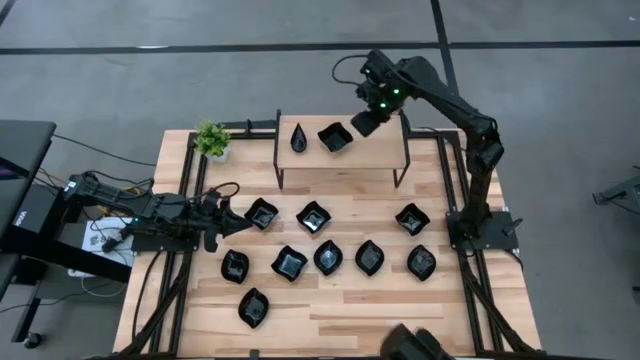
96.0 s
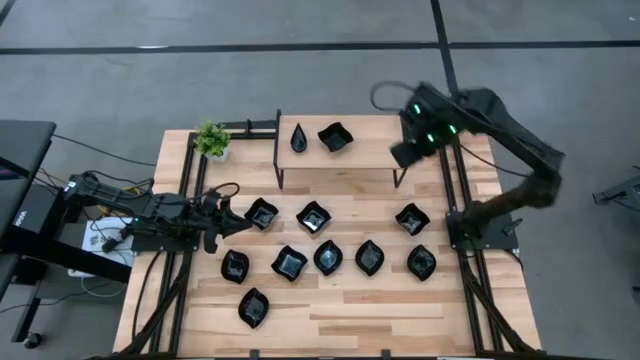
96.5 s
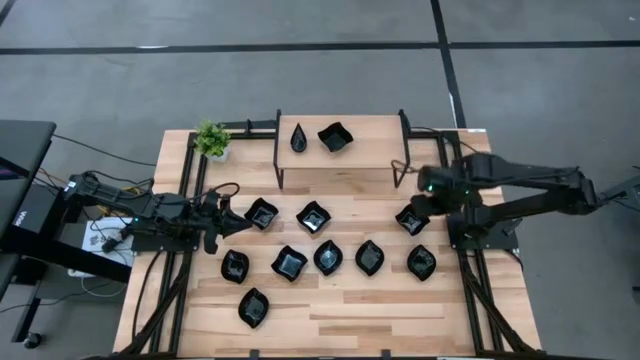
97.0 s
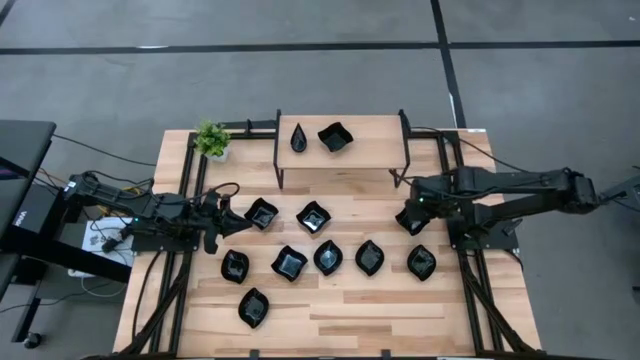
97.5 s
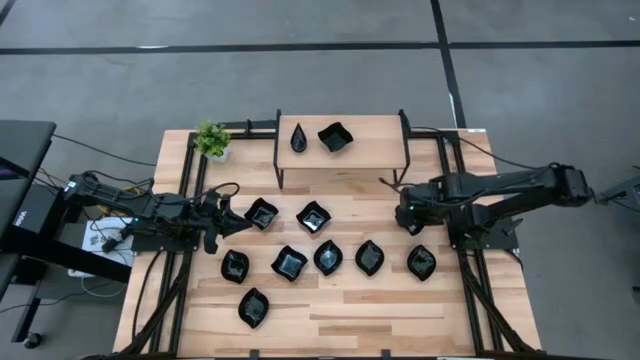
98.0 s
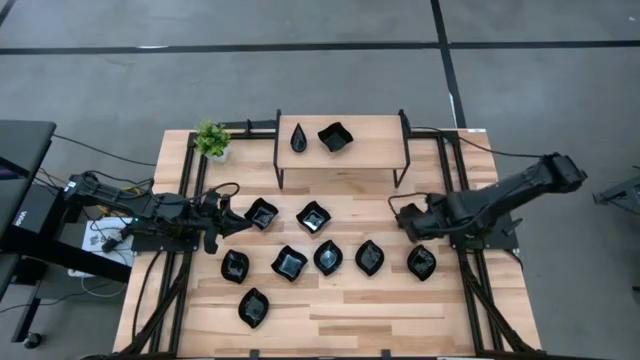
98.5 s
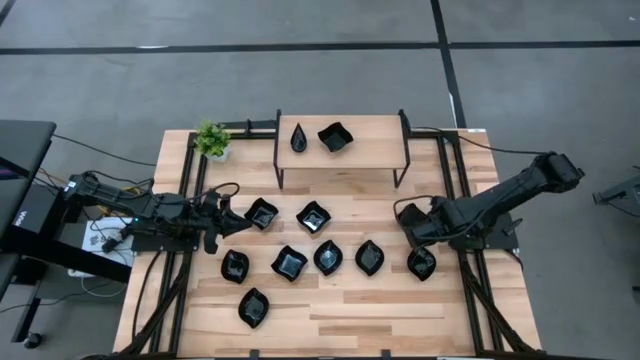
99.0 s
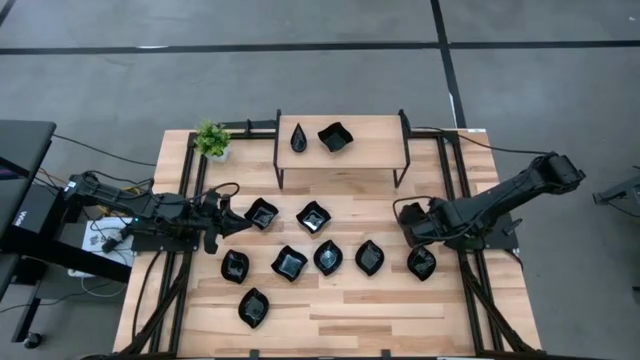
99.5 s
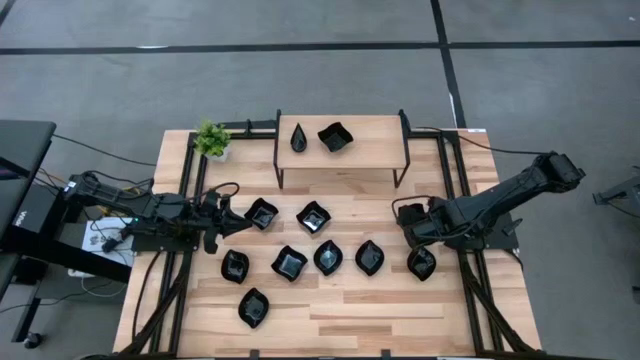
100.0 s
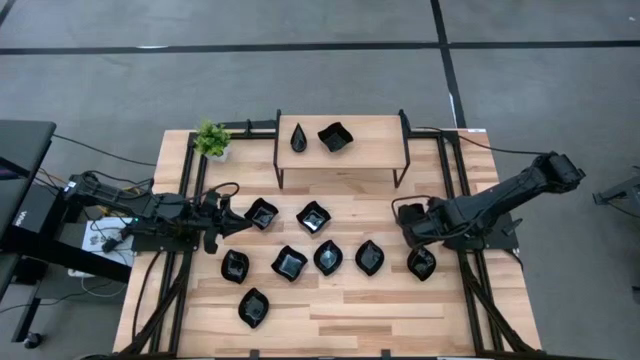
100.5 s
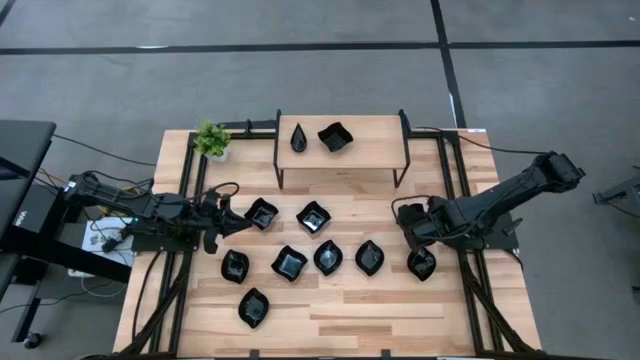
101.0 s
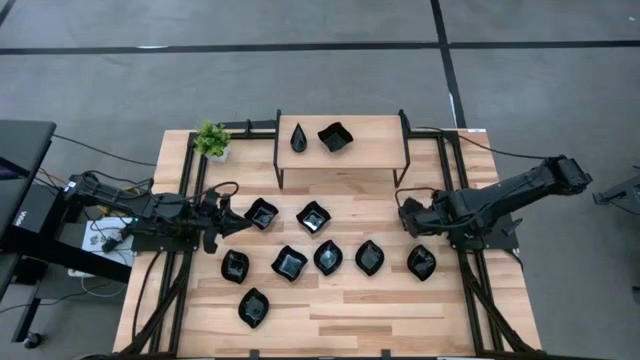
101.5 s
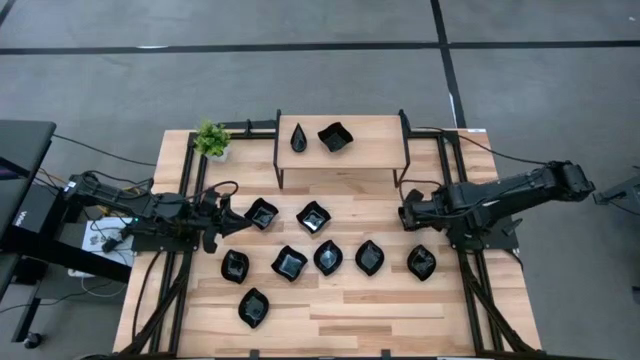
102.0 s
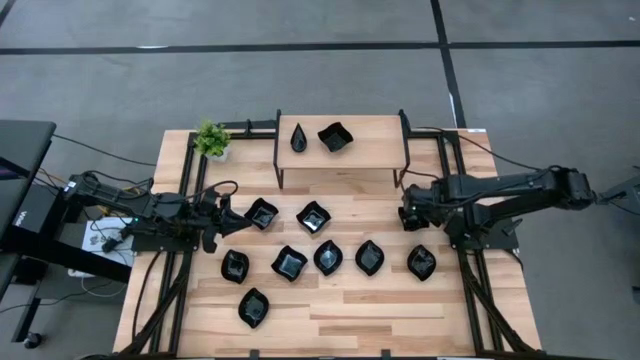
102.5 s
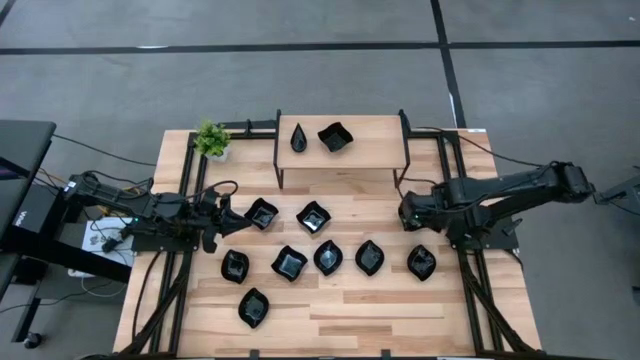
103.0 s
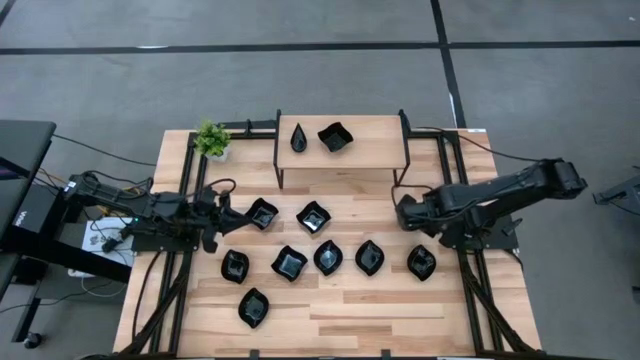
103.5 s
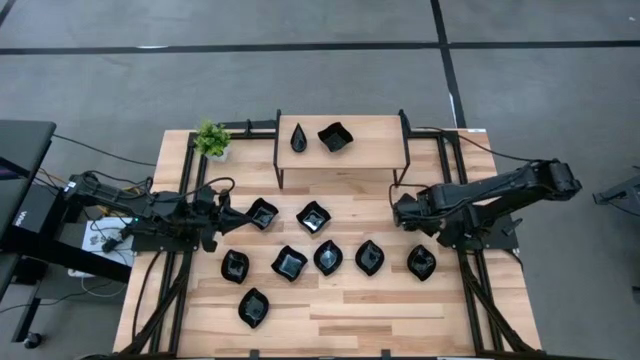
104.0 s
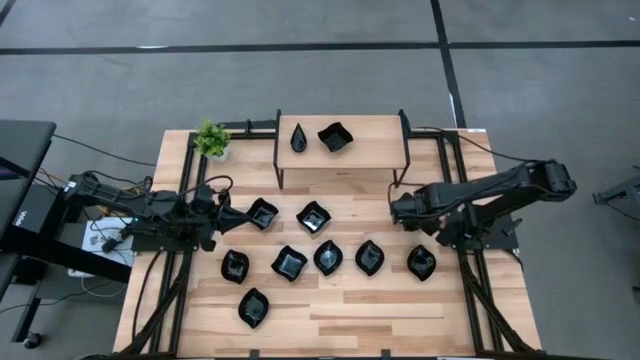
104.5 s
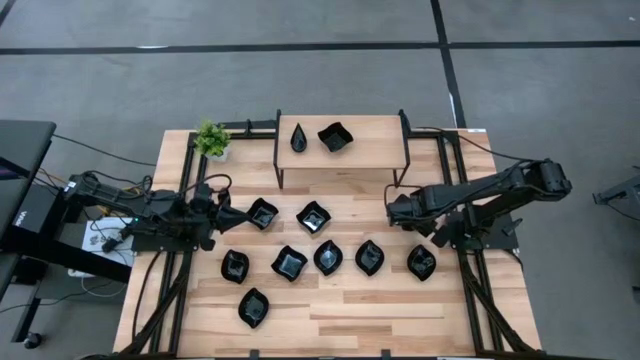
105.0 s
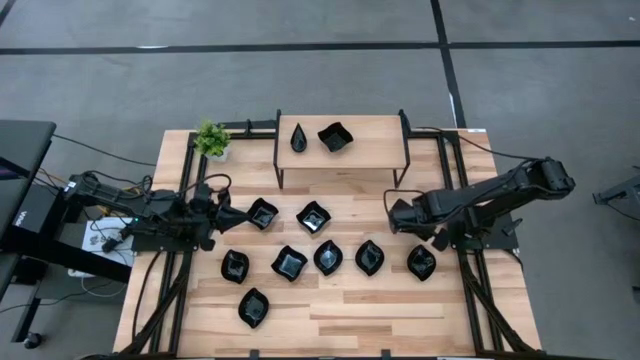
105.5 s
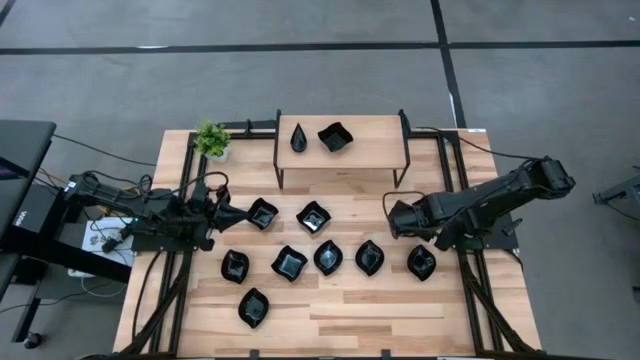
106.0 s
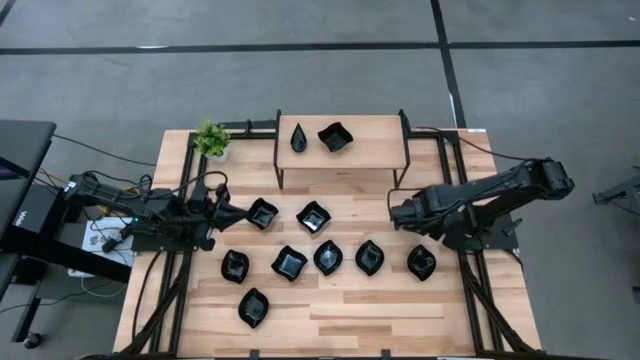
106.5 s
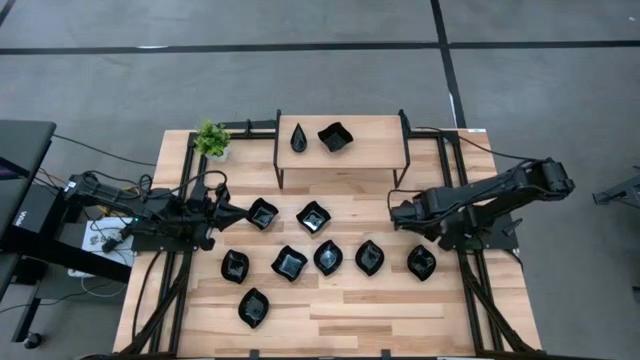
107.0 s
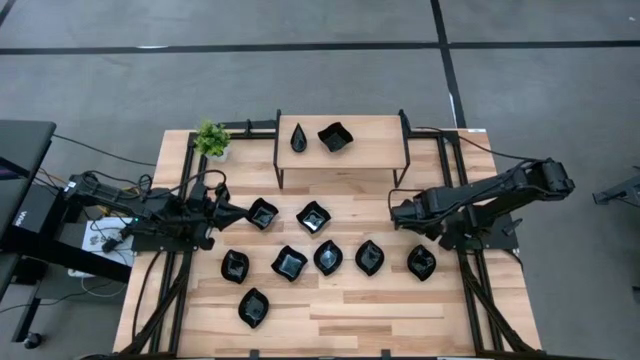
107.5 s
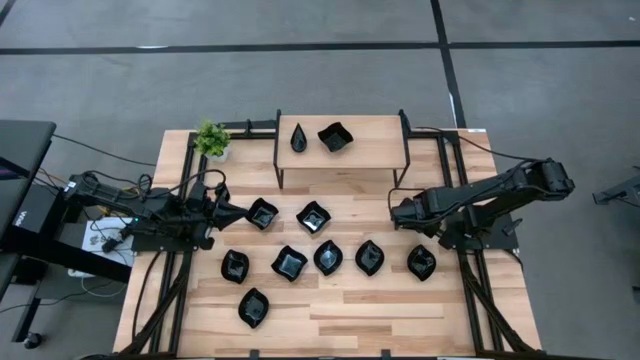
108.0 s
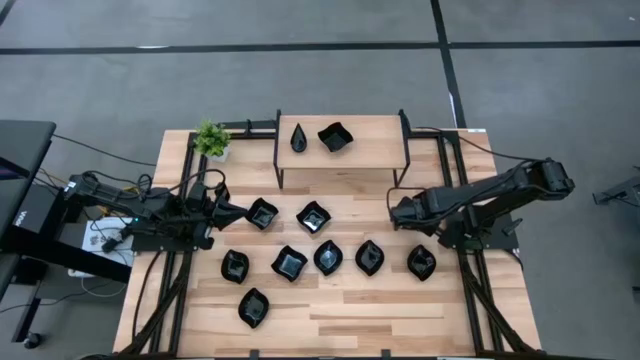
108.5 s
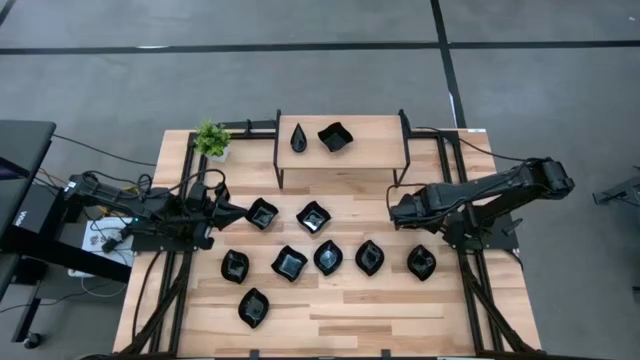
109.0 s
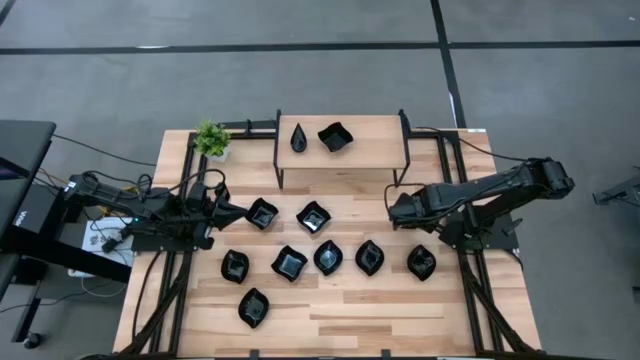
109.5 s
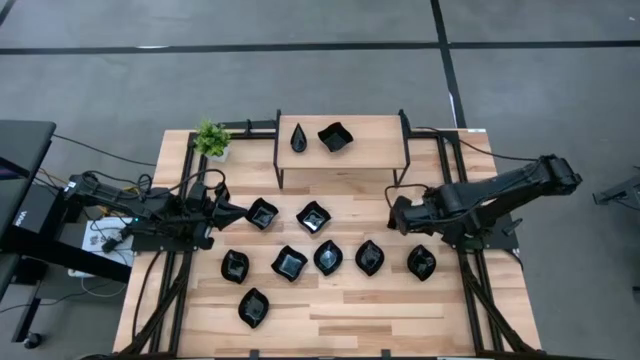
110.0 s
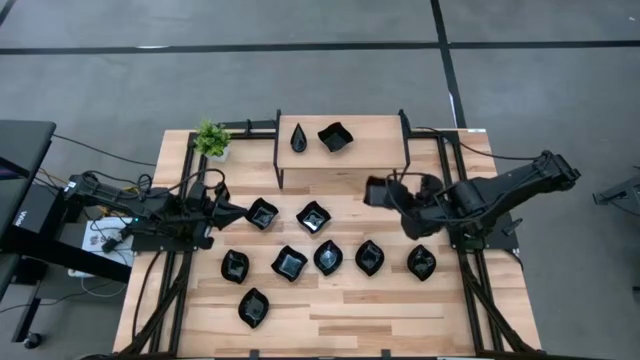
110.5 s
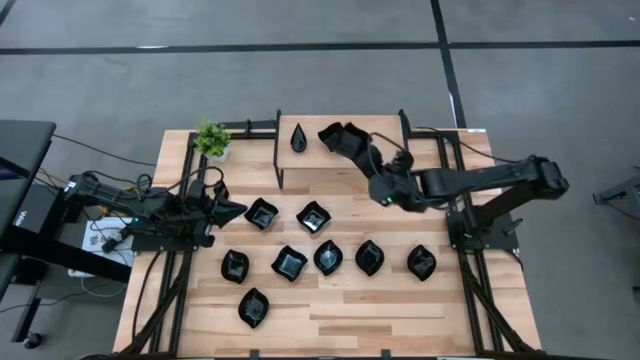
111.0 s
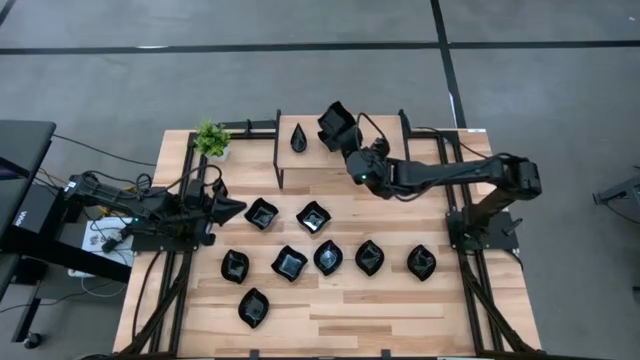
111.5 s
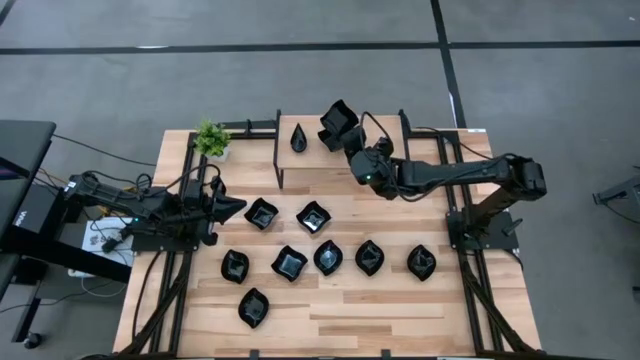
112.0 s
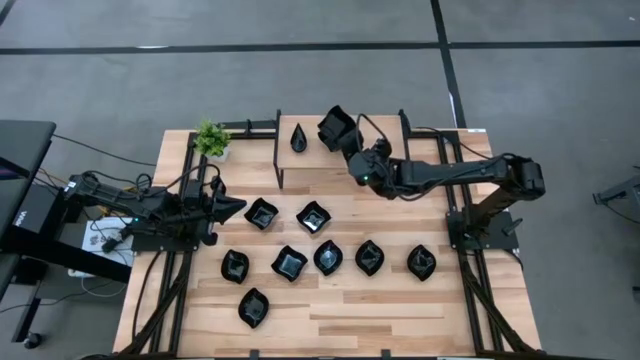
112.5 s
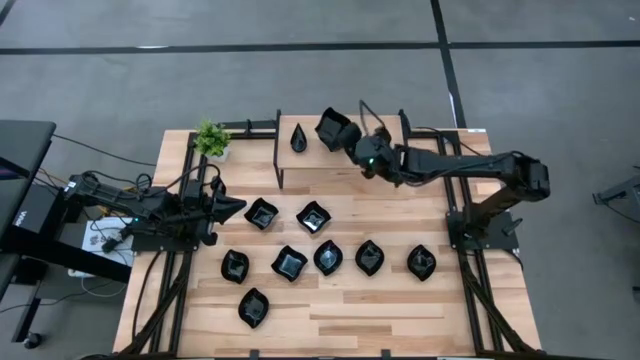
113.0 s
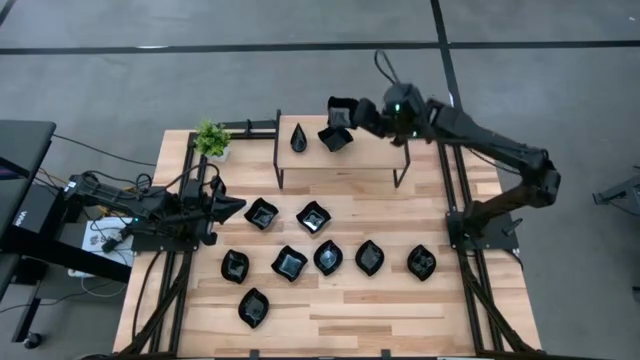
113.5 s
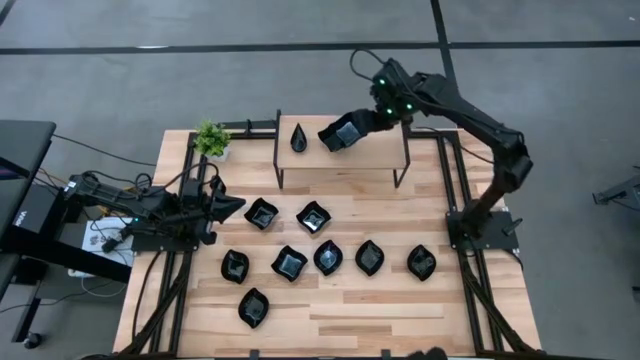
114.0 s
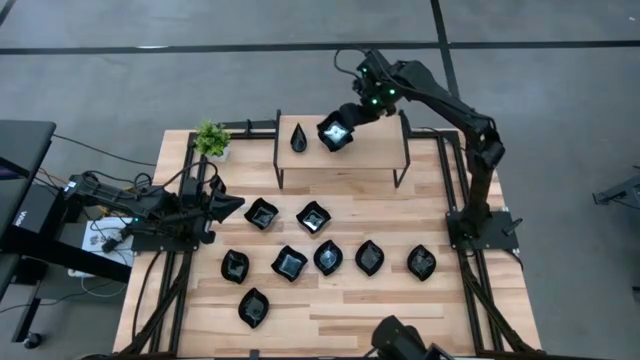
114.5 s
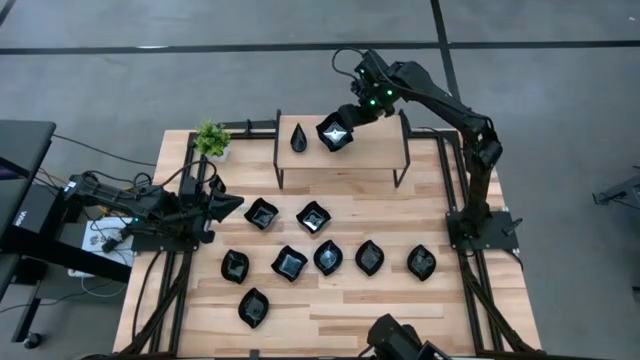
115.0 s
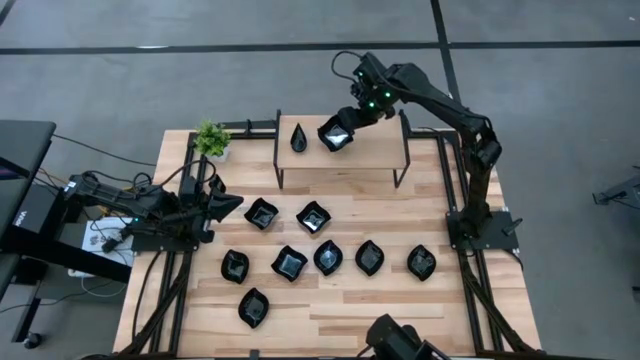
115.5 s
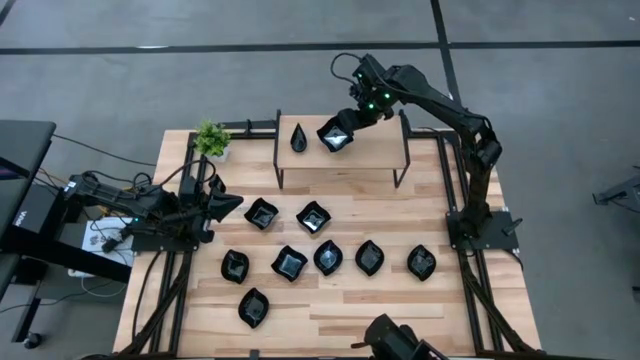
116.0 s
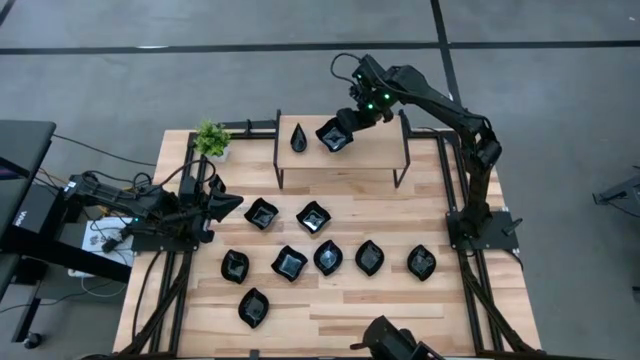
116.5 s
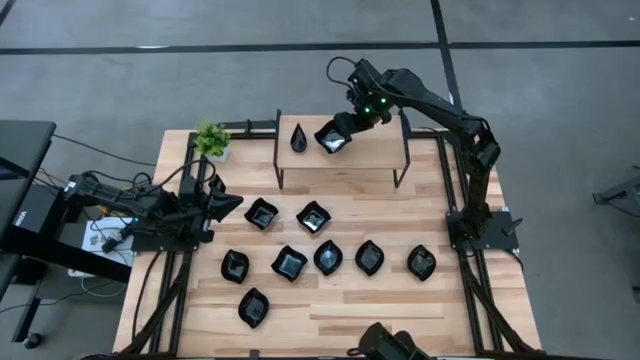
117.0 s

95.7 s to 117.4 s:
Task: Pick & Place Mini shaped plates
Stack the black distorted square plate on top of the black distorted square plate on the shelf

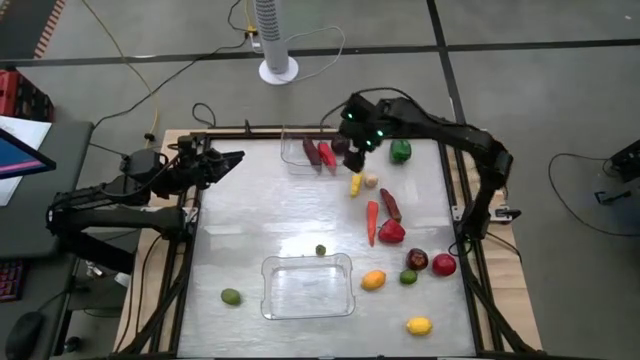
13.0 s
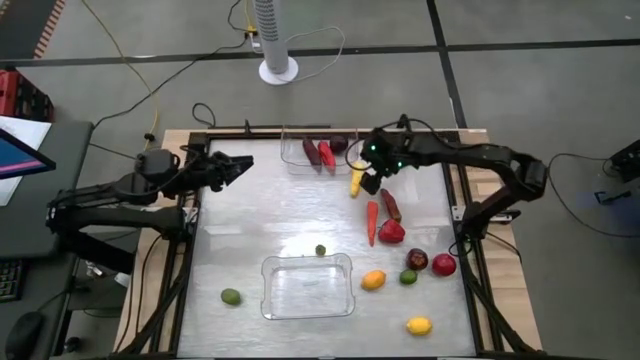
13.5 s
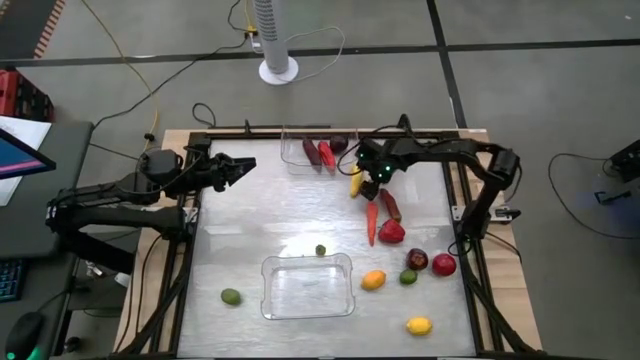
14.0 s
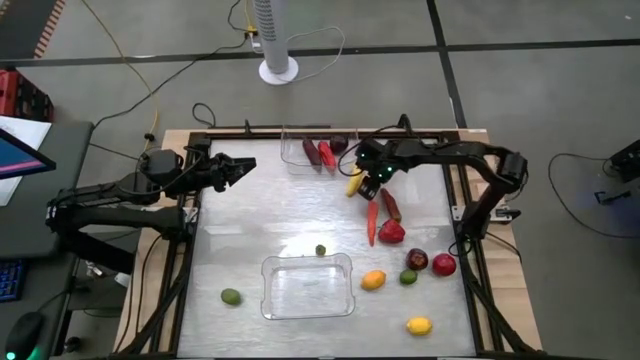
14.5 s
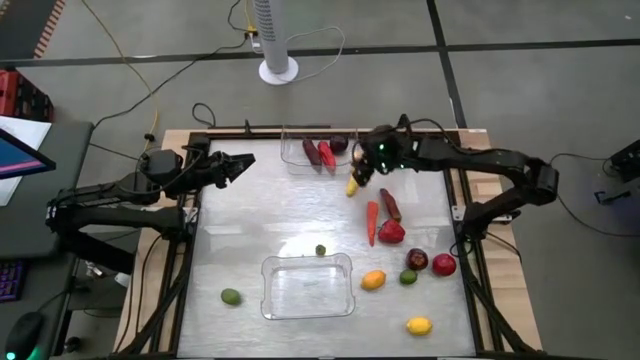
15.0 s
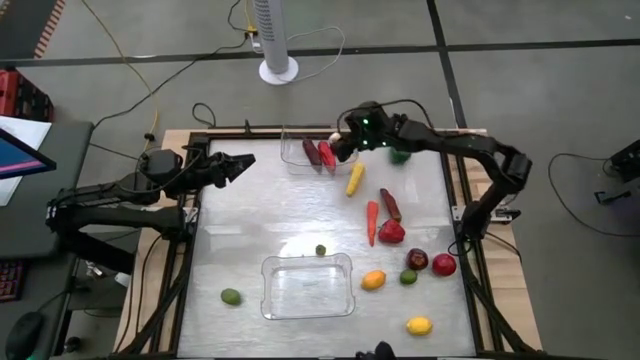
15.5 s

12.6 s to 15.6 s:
Task: Sort produce into baskets
Put the garlic into the top transparent bin
